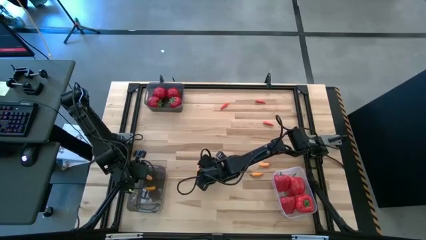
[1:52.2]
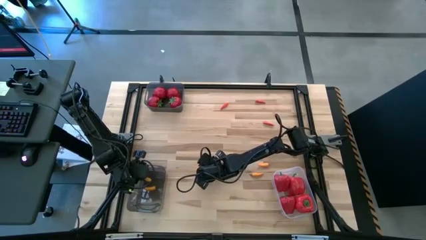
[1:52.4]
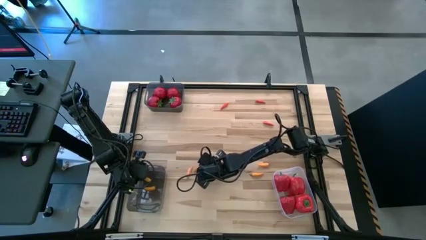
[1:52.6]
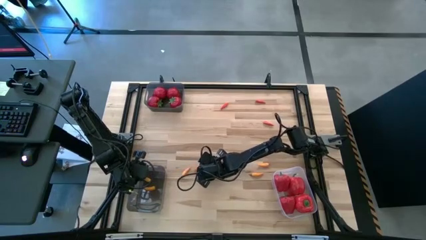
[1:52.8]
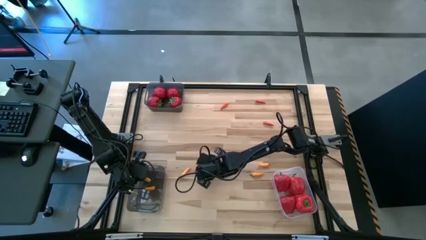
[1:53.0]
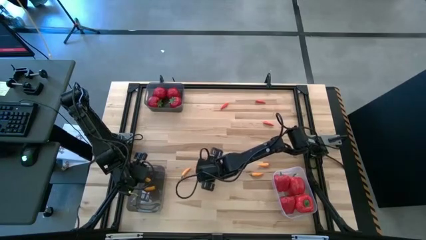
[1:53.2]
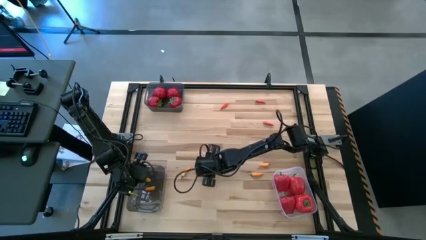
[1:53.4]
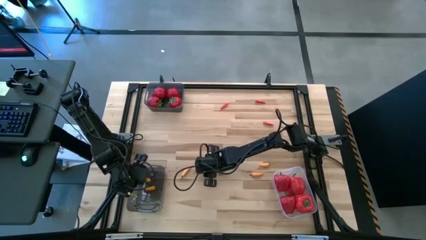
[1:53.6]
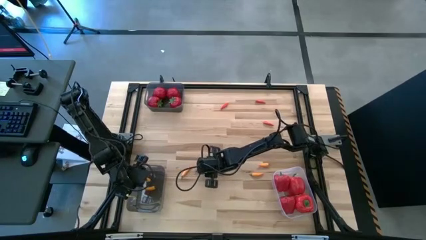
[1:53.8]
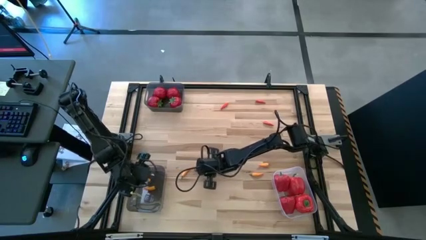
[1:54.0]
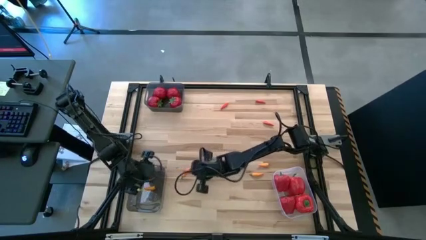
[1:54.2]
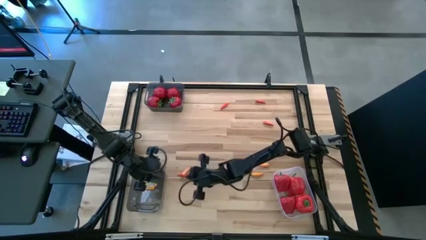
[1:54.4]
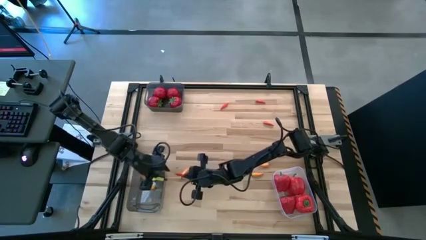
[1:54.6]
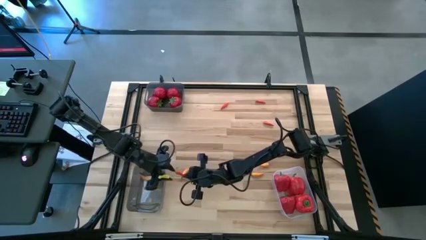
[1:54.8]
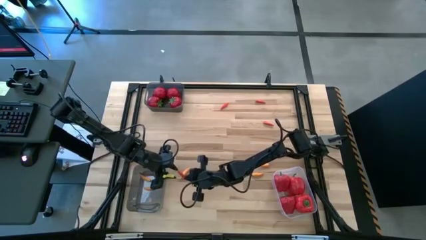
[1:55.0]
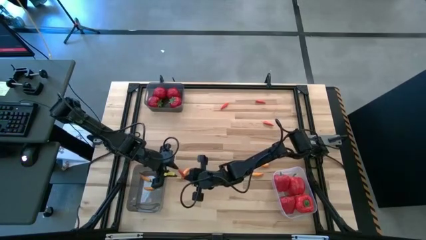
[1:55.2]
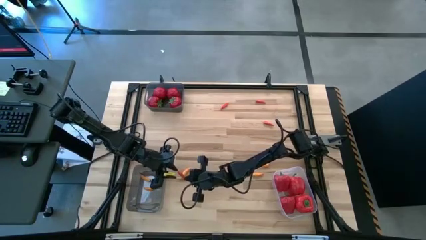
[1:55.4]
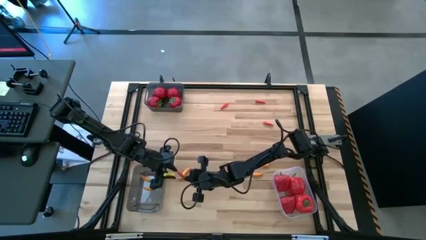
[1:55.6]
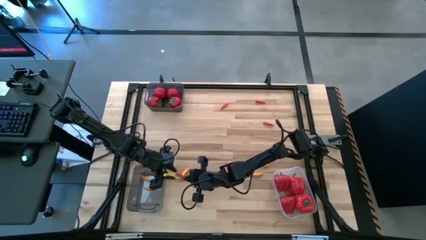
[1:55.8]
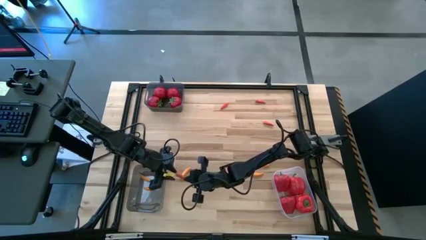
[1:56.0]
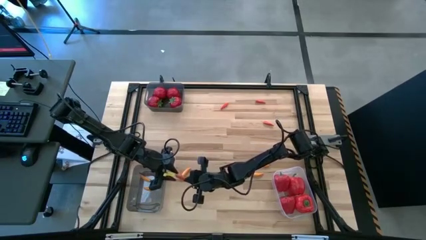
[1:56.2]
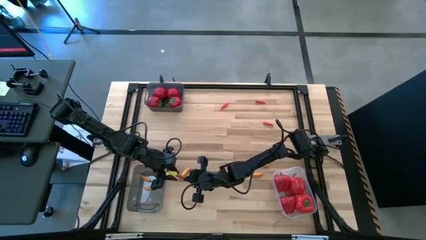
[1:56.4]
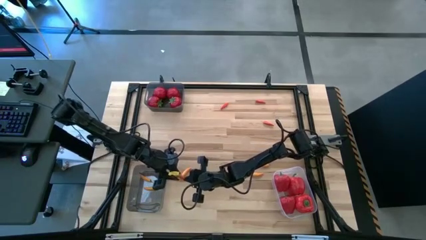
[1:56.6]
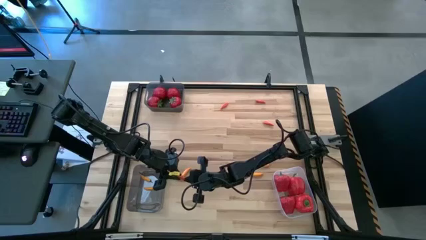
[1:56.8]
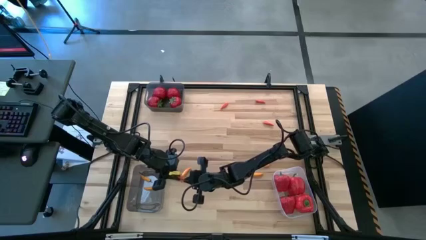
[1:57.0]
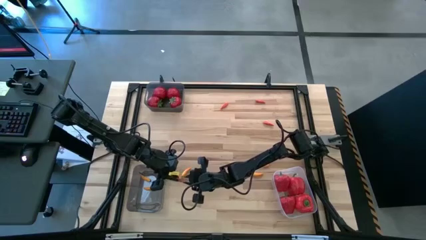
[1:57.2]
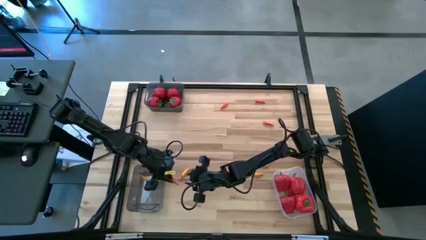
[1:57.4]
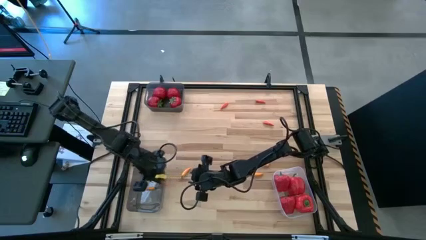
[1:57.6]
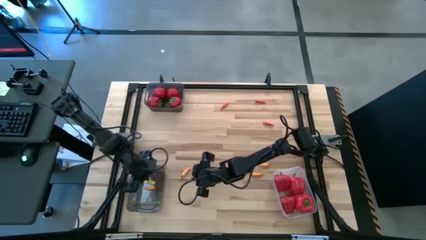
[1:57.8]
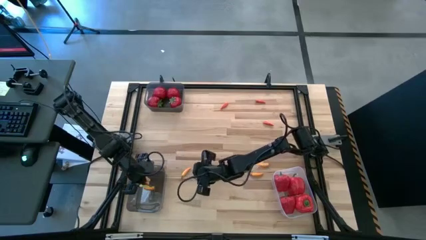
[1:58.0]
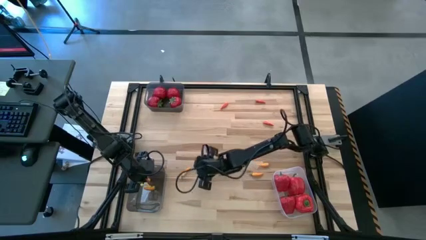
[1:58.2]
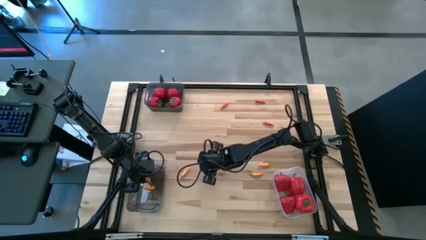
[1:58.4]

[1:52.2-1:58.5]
Task: Sort produce into baskets
Put the orange chili pepper into the bottom black bin

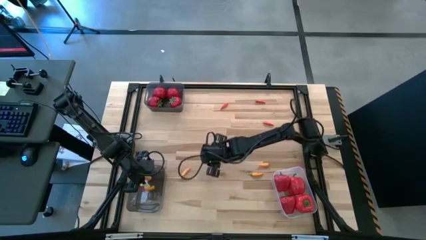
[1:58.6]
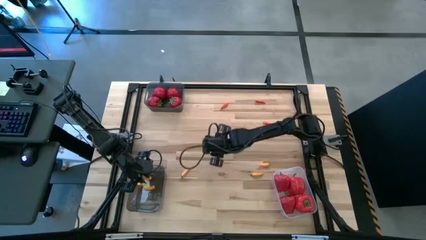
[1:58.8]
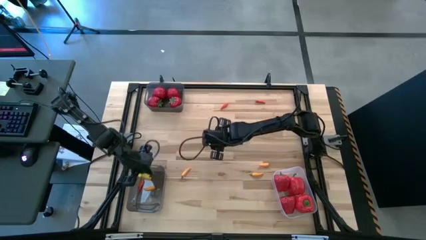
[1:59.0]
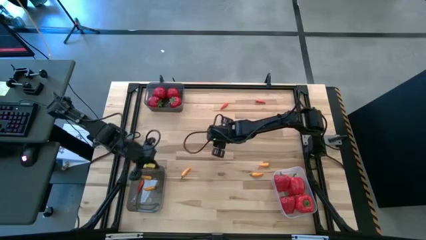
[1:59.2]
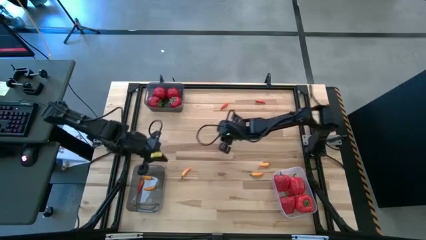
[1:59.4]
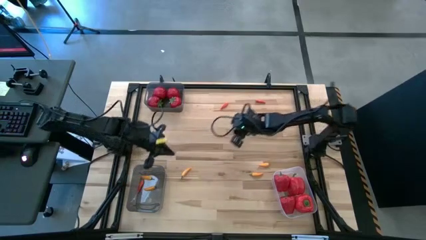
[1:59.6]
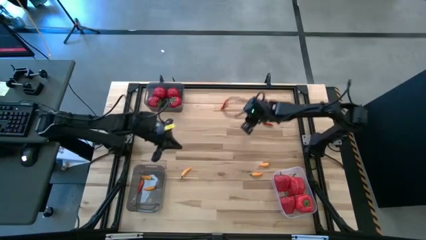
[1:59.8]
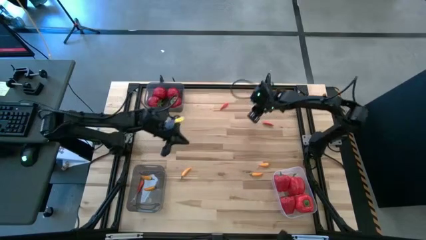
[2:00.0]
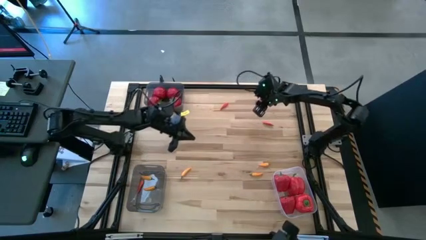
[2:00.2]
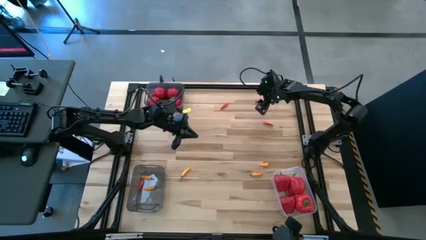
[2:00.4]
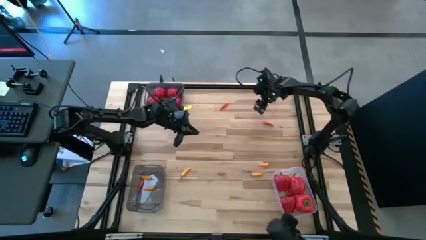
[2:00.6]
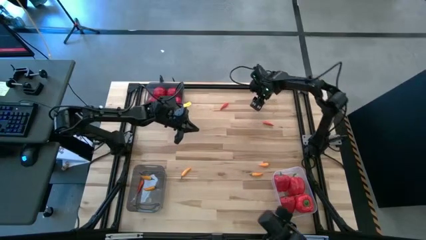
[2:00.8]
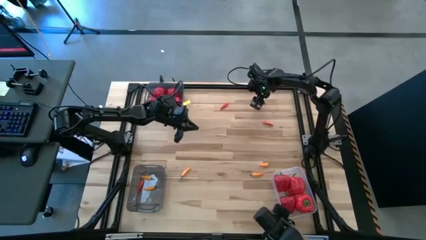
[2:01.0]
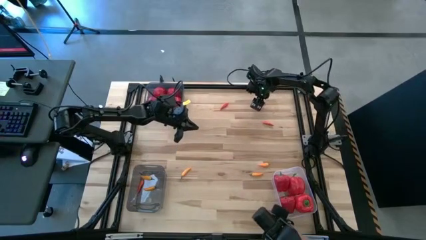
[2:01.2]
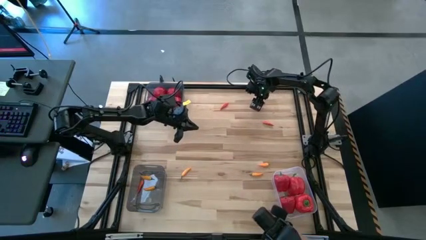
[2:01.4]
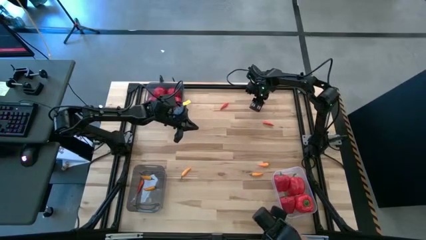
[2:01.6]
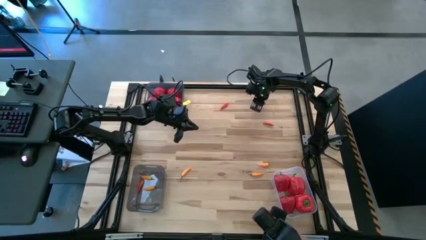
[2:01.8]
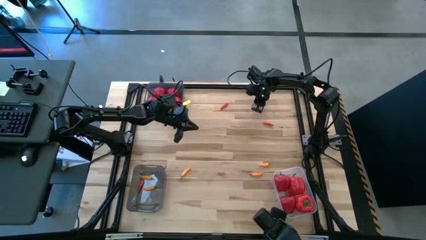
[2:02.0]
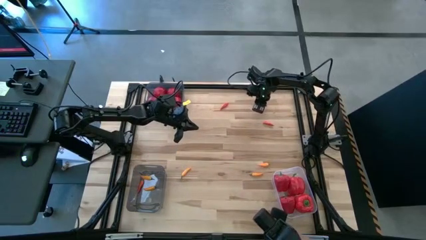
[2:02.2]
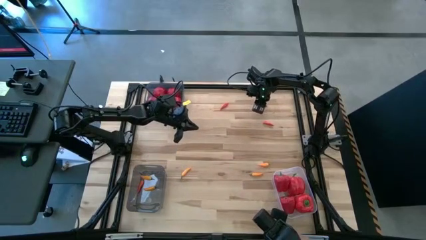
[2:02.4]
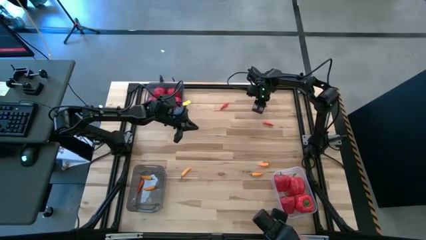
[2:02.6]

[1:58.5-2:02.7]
Put the orange chili pepper into the bottom black bin

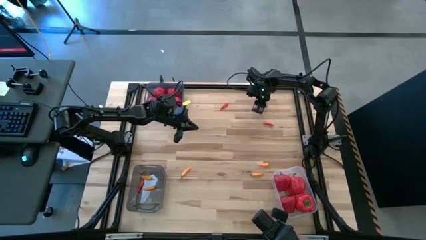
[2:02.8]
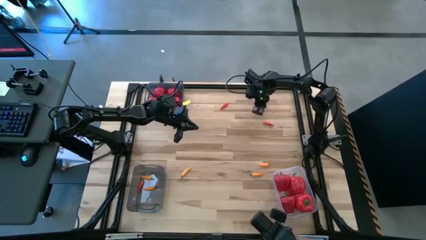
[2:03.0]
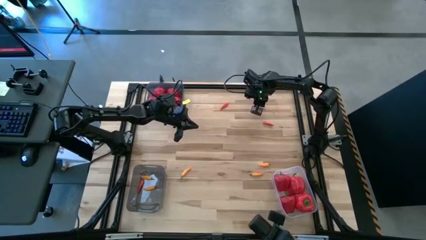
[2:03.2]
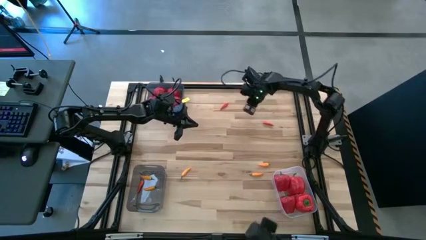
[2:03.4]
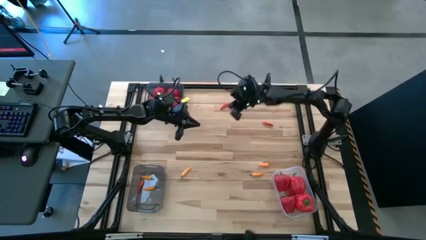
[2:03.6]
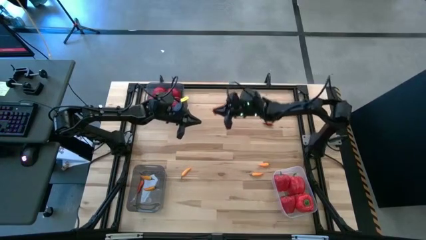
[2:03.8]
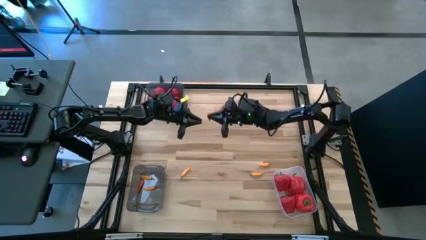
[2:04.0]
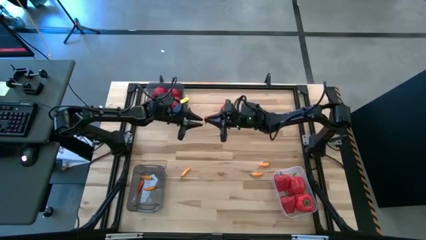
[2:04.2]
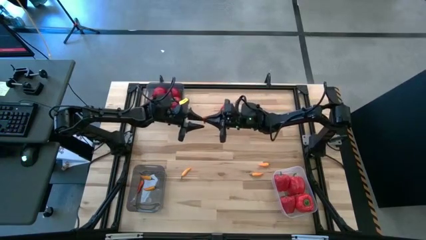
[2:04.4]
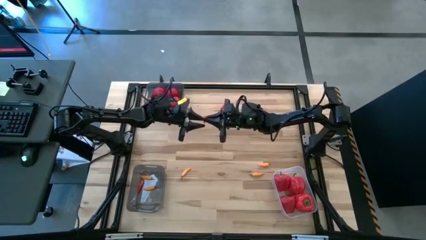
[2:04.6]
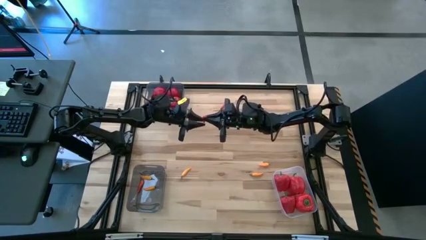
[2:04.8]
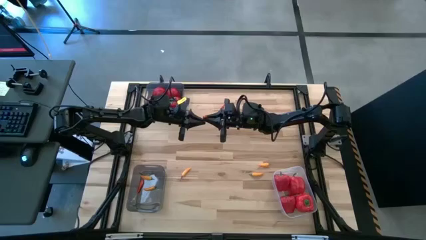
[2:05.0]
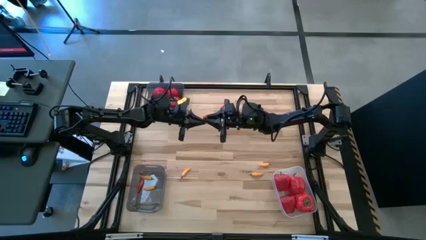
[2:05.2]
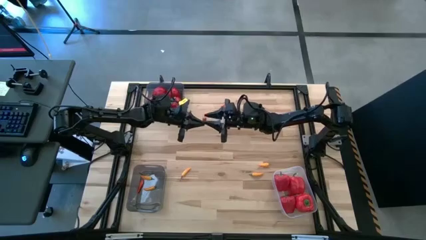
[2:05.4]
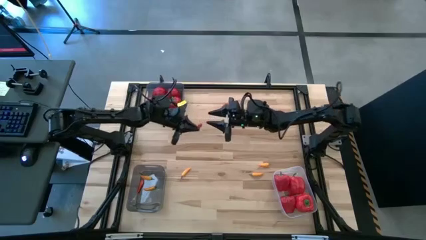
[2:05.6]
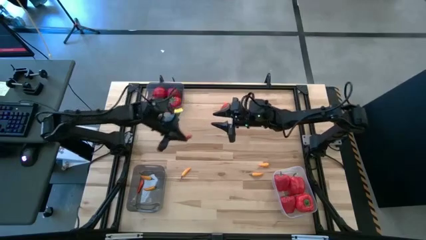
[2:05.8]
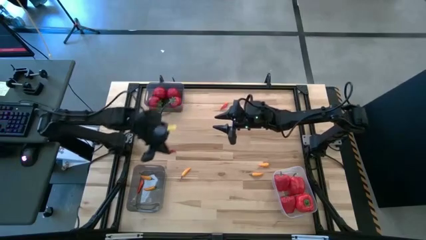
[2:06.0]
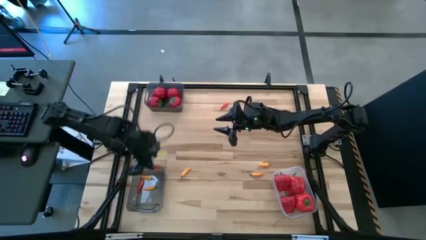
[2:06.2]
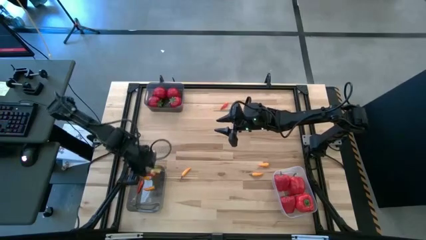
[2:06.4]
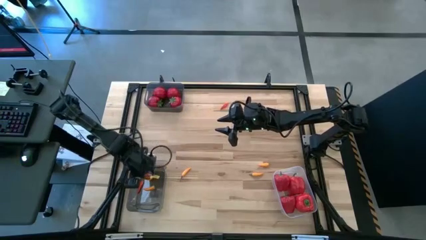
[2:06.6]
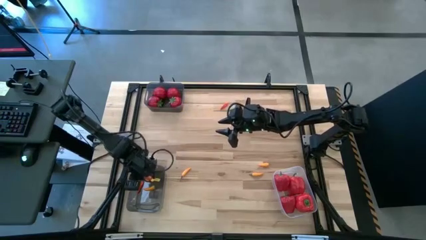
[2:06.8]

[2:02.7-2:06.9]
Put the orange chili pepper into the bottom black bin
